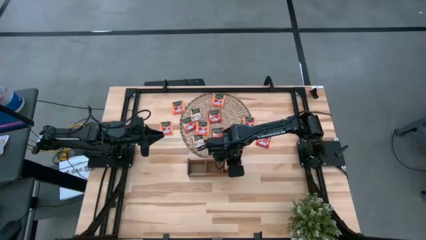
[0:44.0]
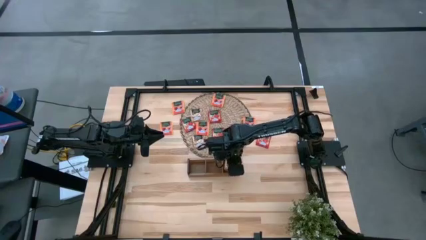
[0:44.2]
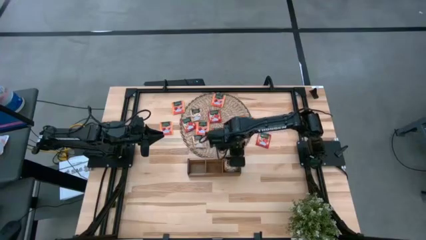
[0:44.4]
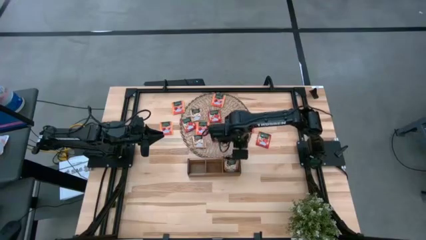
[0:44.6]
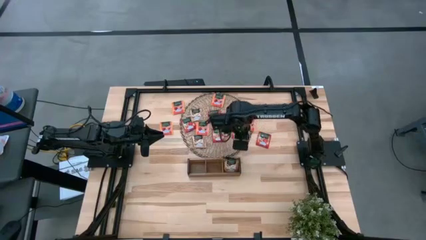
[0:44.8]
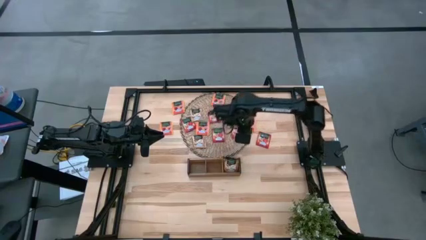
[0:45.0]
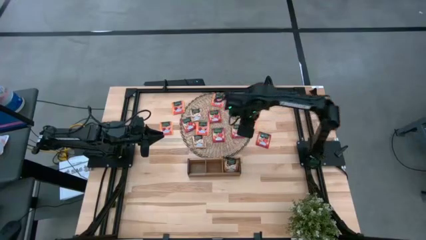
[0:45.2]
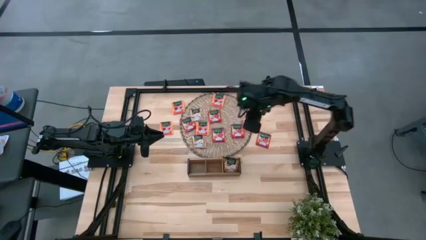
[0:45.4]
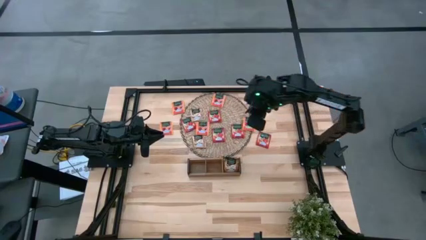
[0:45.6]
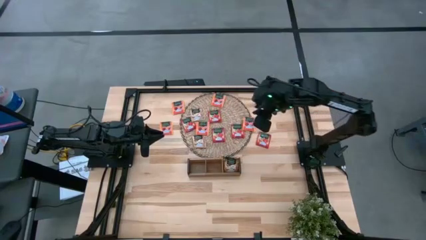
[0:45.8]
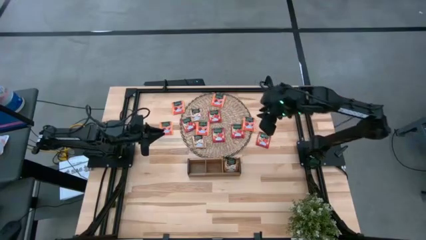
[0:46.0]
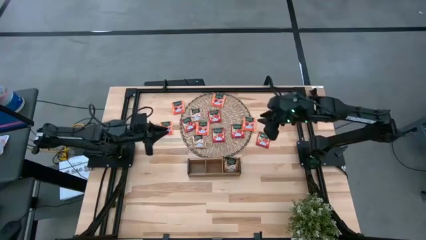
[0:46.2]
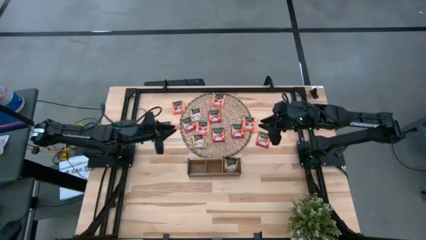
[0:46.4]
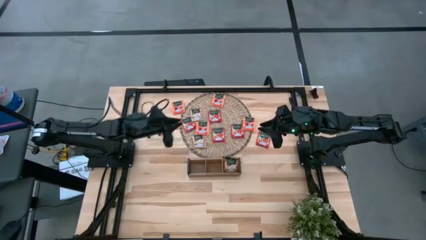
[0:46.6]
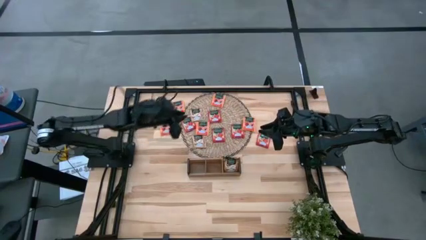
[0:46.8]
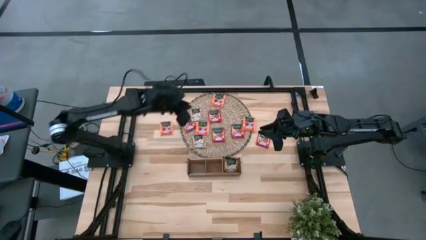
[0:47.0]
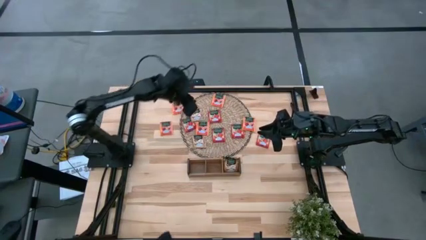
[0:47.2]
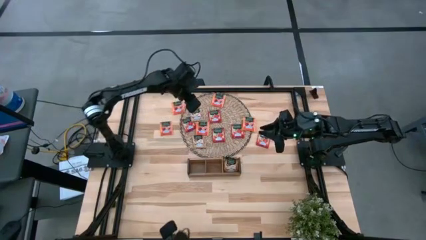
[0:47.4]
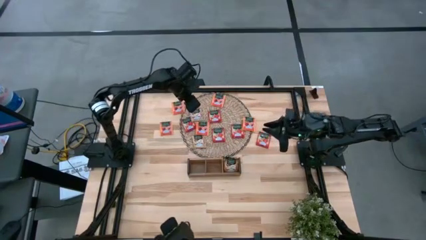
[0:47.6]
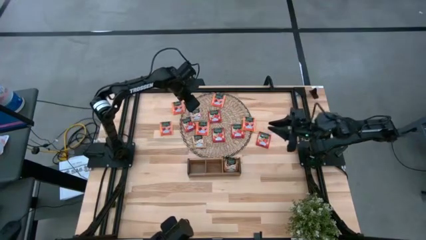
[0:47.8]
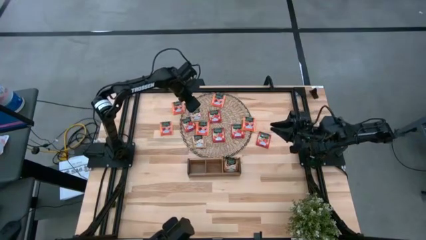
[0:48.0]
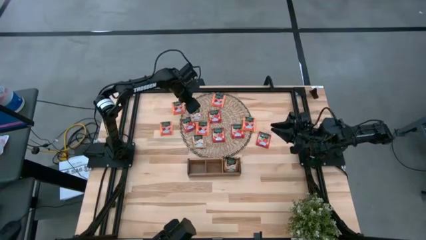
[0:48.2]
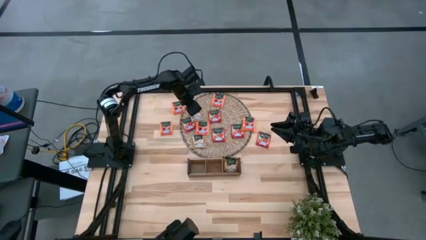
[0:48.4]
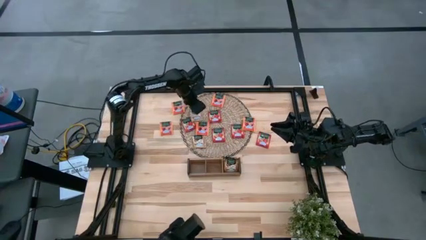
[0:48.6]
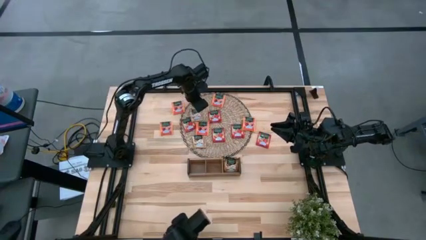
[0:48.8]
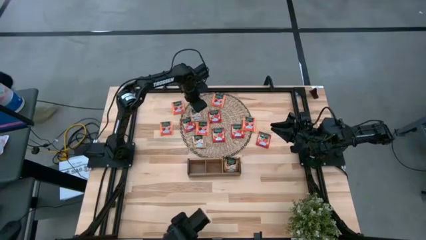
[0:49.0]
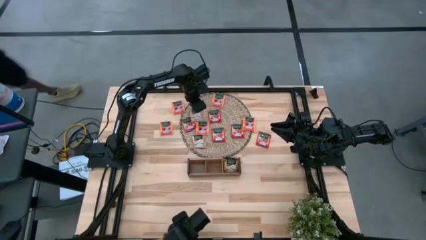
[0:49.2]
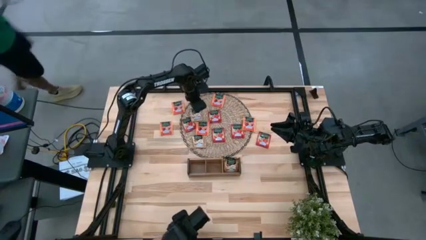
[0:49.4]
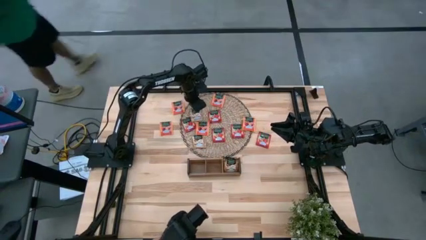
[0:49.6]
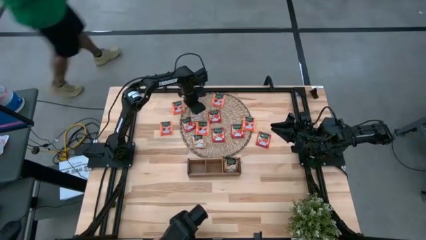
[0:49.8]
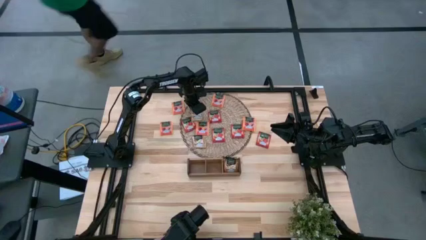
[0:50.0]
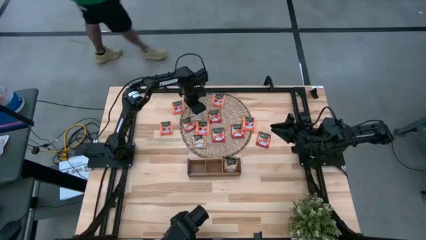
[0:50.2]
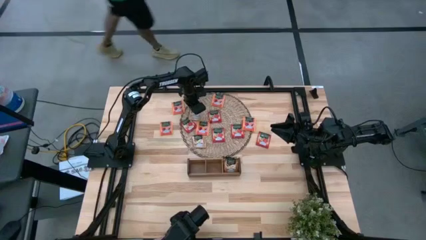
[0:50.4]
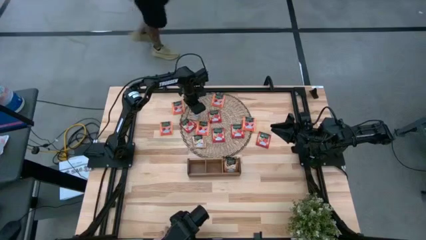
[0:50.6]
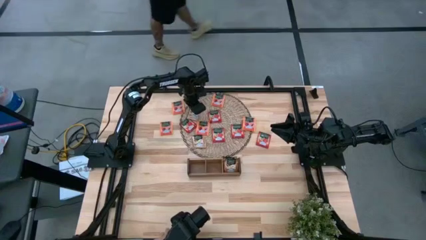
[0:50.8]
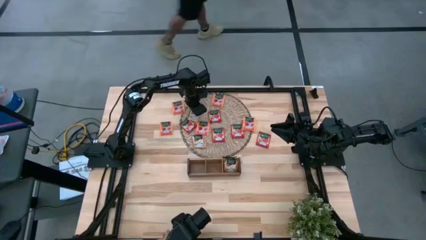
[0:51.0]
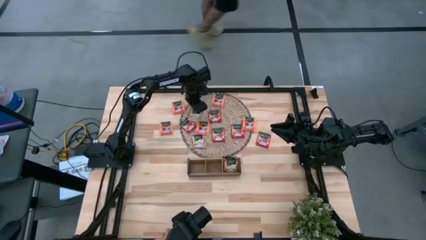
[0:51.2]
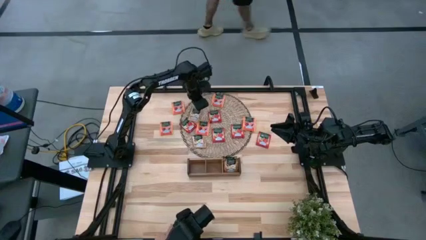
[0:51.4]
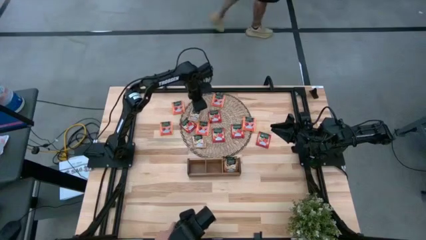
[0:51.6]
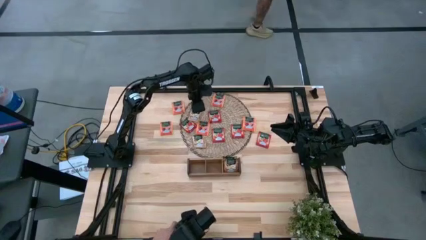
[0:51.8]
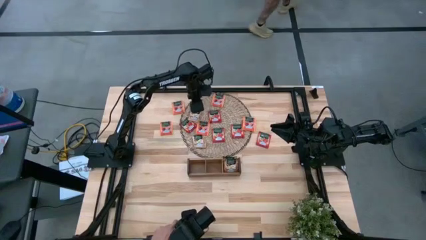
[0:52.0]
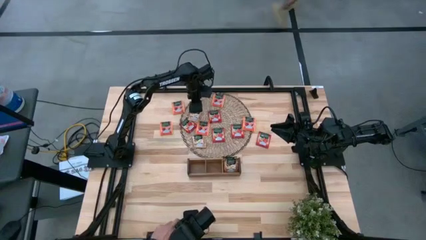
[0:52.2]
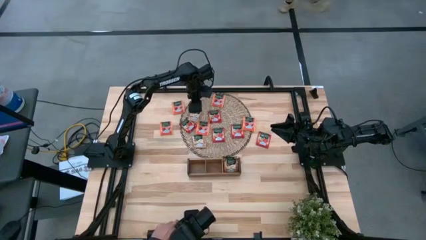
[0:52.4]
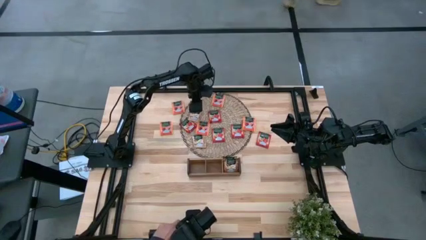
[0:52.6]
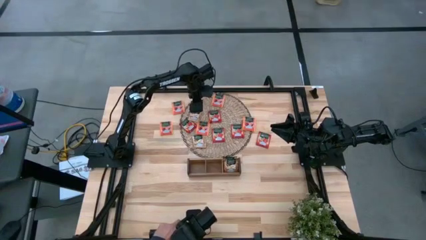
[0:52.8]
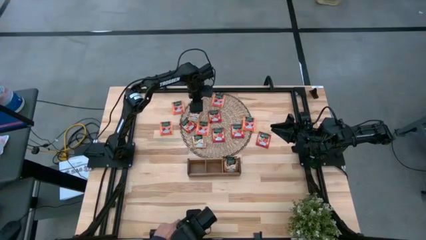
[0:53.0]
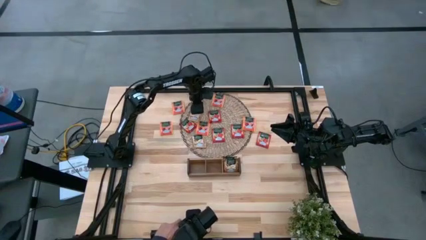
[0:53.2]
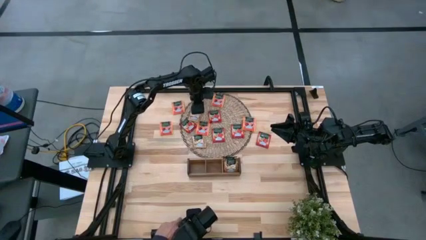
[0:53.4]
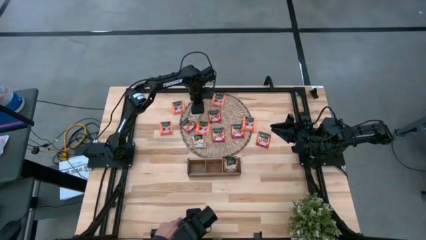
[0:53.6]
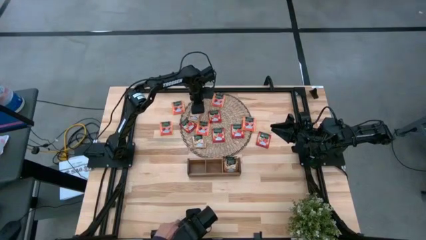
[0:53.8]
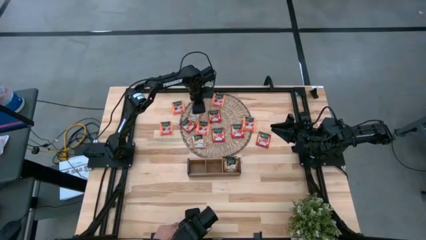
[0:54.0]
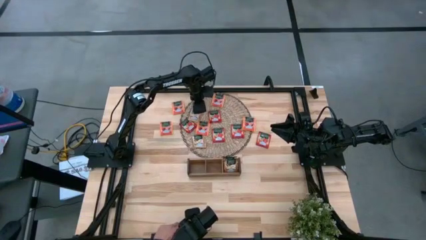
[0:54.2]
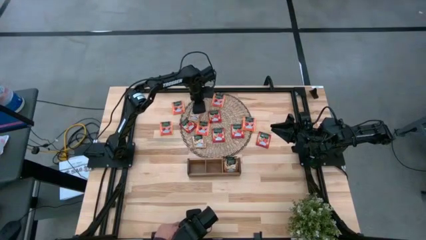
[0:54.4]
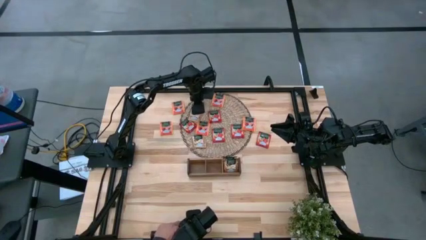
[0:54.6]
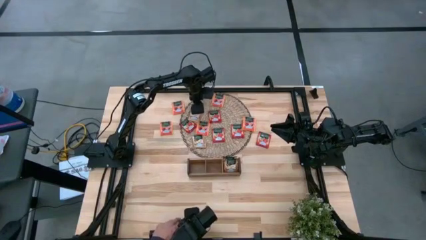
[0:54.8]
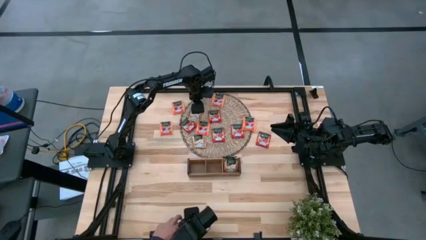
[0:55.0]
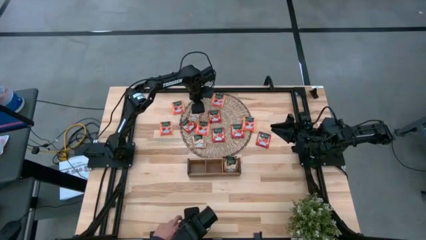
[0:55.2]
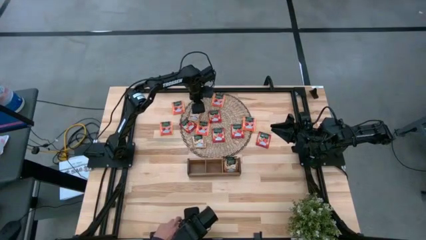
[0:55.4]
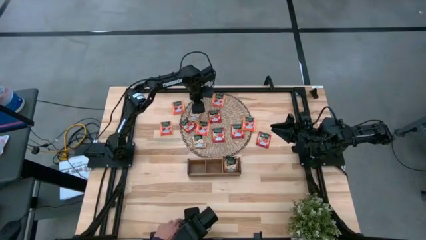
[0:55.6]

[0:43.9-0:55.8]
Task: Pick & Place Tea
Put the gold tea bag into the right section of the wooden organizer
